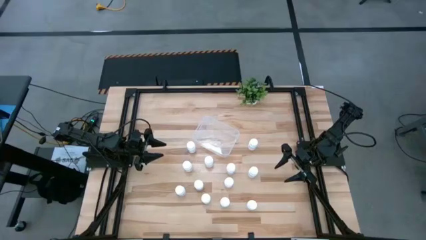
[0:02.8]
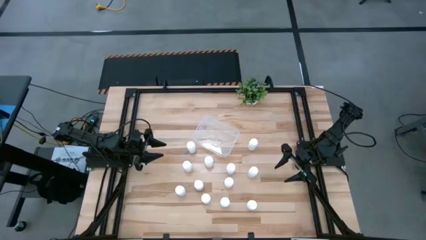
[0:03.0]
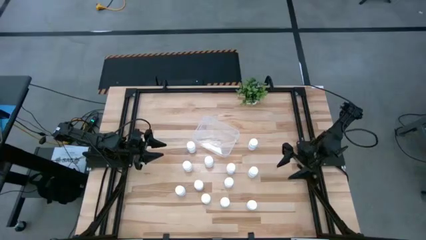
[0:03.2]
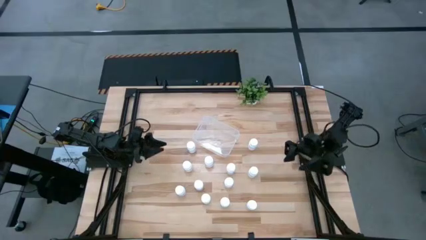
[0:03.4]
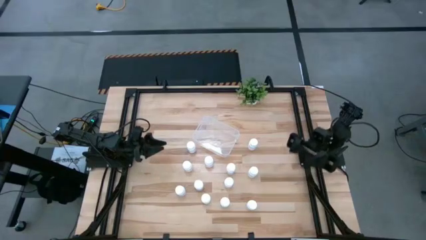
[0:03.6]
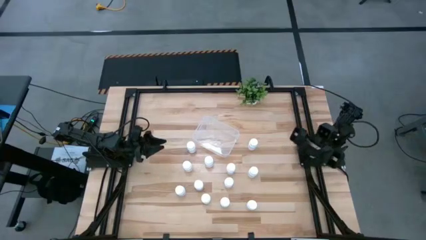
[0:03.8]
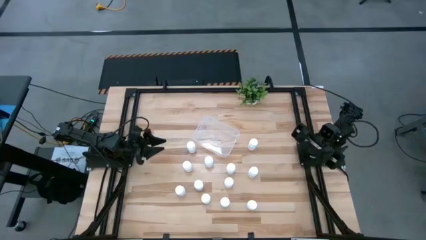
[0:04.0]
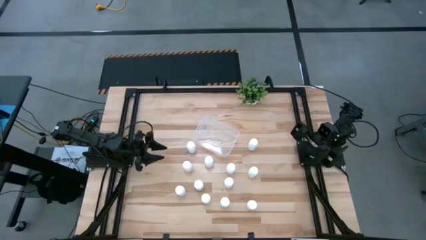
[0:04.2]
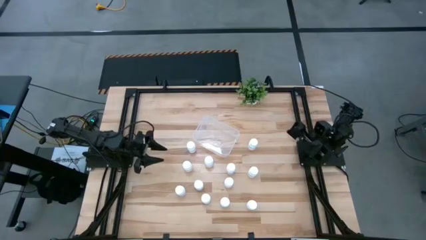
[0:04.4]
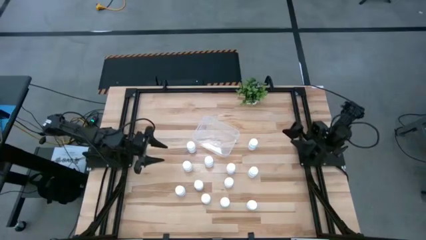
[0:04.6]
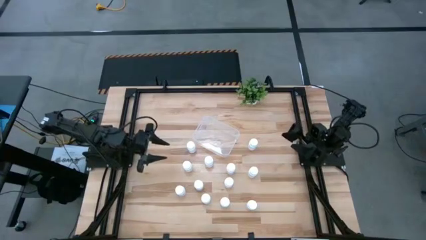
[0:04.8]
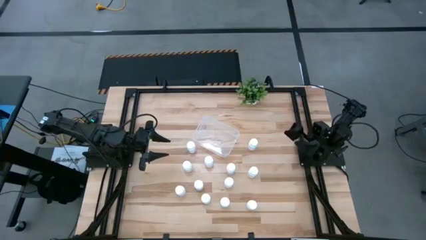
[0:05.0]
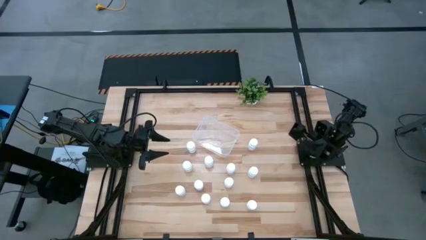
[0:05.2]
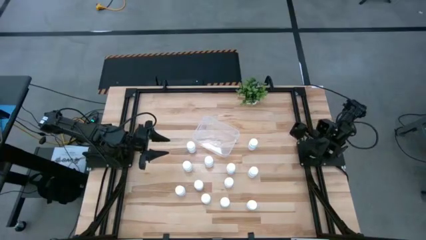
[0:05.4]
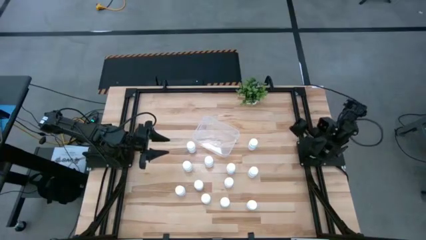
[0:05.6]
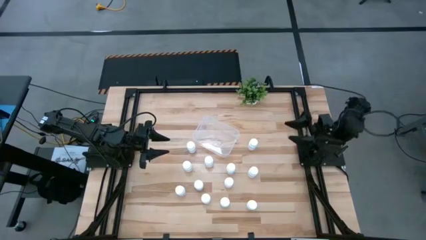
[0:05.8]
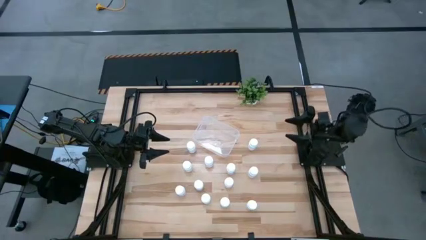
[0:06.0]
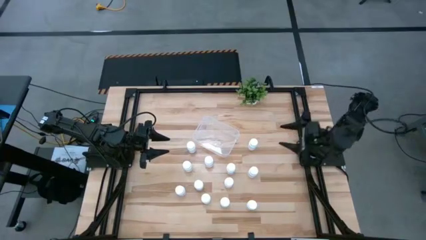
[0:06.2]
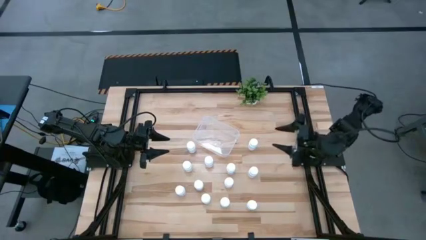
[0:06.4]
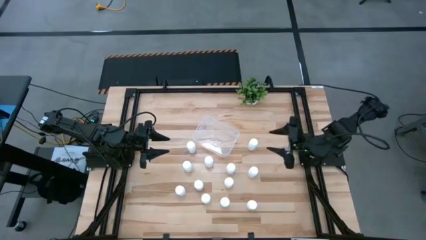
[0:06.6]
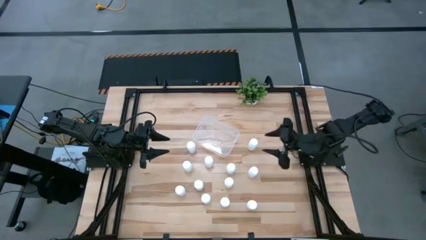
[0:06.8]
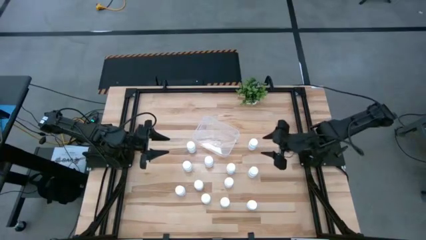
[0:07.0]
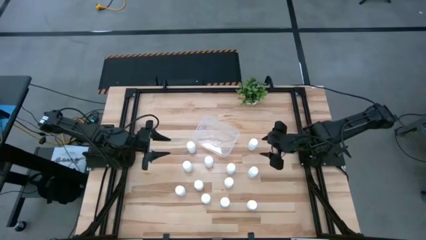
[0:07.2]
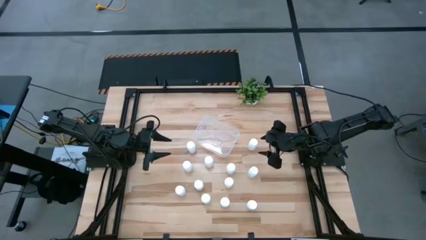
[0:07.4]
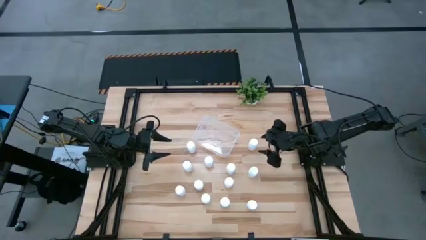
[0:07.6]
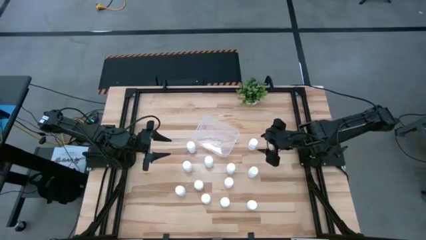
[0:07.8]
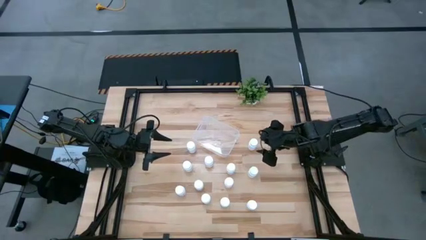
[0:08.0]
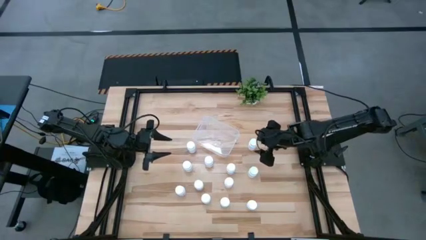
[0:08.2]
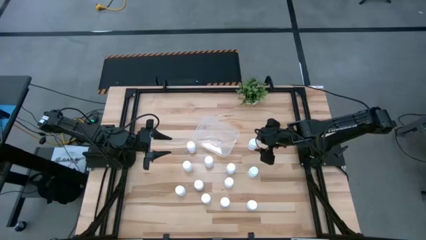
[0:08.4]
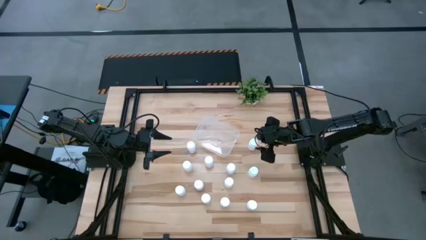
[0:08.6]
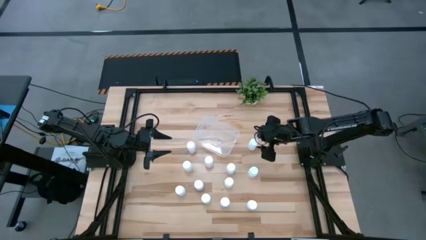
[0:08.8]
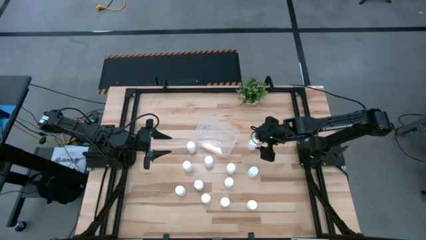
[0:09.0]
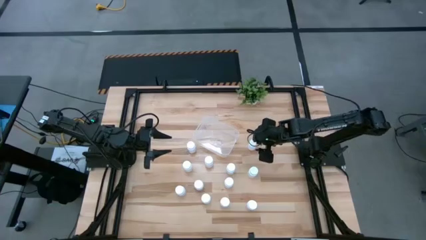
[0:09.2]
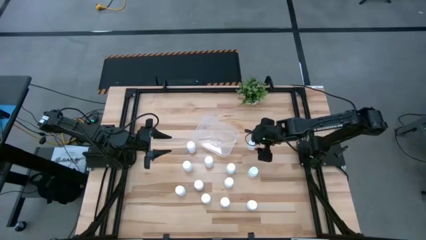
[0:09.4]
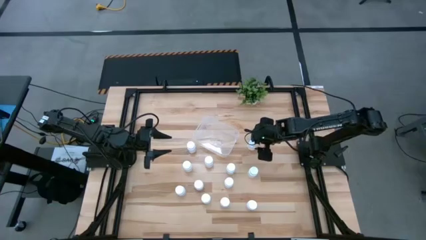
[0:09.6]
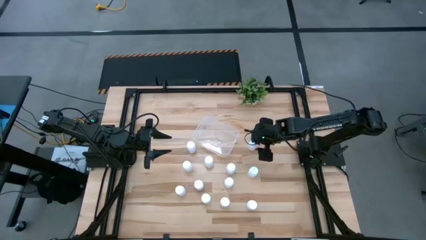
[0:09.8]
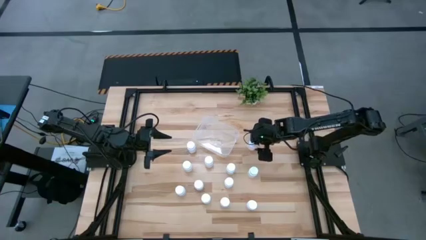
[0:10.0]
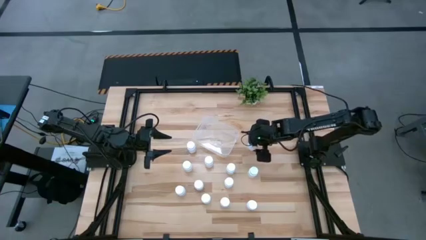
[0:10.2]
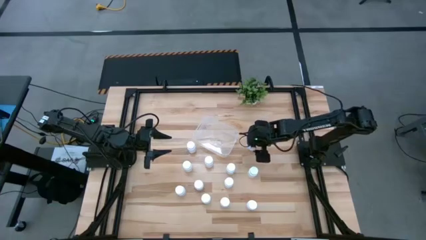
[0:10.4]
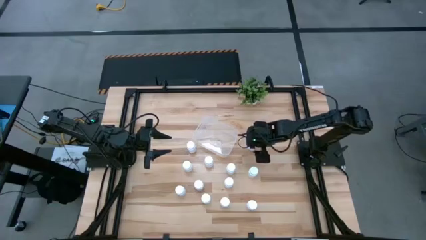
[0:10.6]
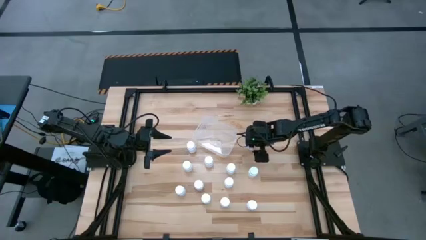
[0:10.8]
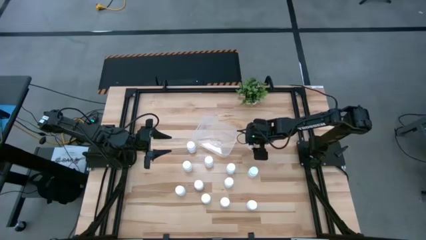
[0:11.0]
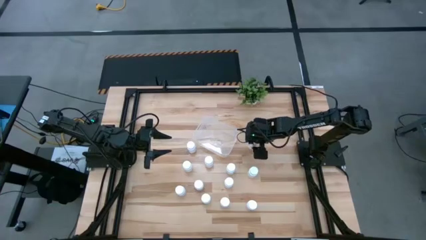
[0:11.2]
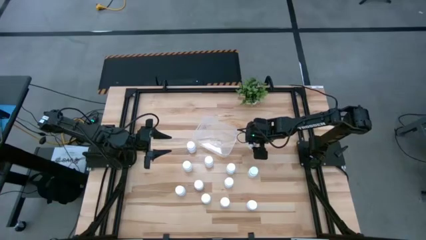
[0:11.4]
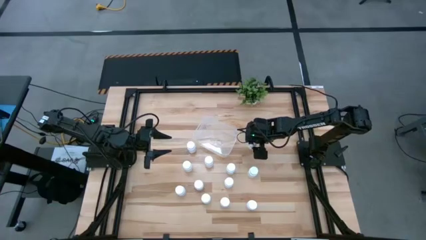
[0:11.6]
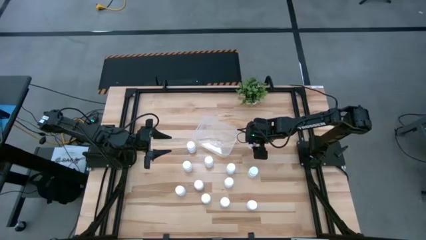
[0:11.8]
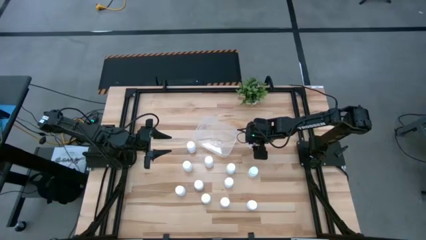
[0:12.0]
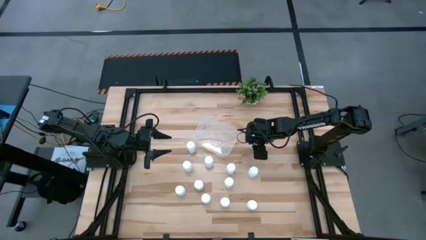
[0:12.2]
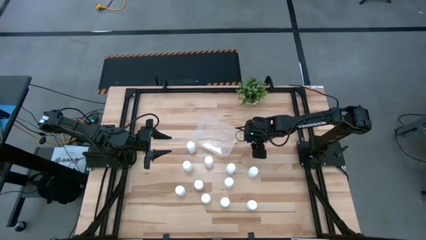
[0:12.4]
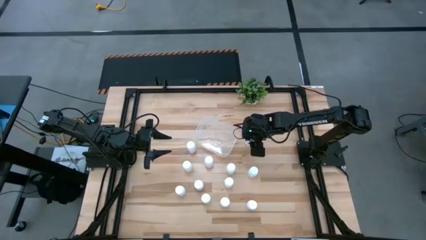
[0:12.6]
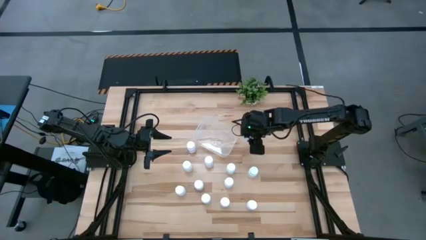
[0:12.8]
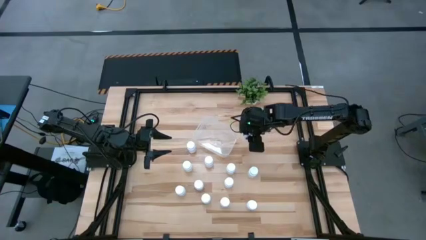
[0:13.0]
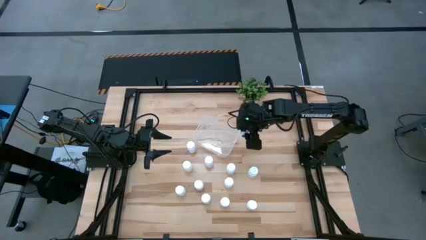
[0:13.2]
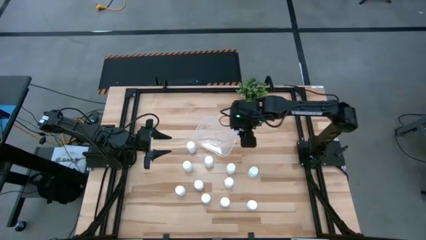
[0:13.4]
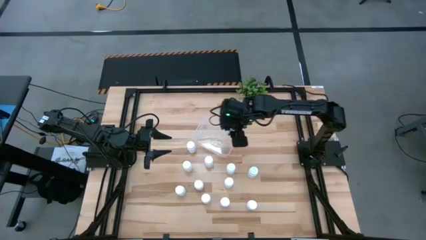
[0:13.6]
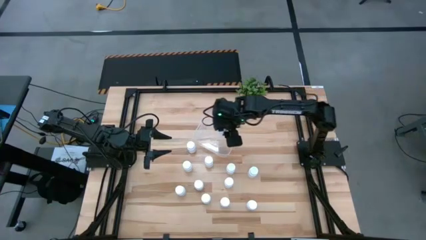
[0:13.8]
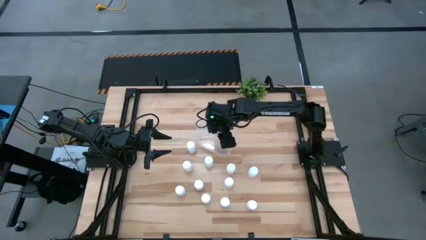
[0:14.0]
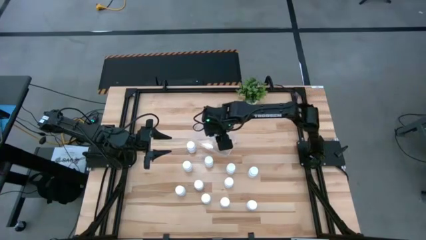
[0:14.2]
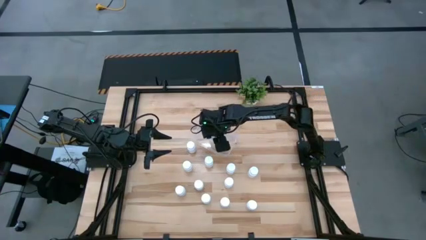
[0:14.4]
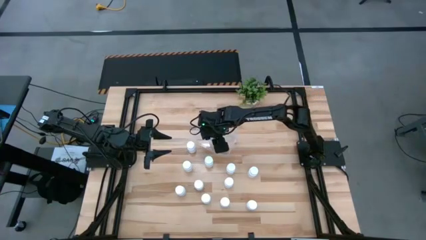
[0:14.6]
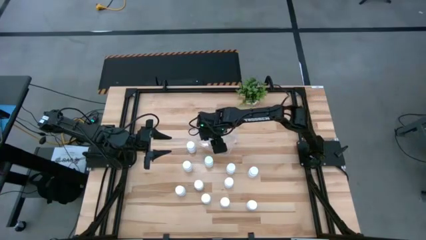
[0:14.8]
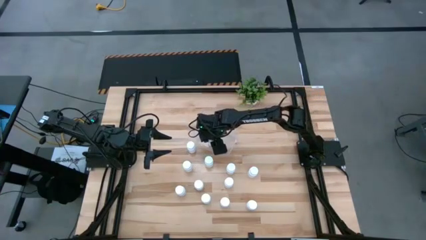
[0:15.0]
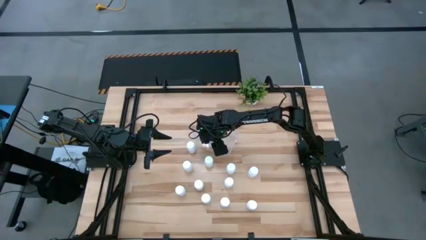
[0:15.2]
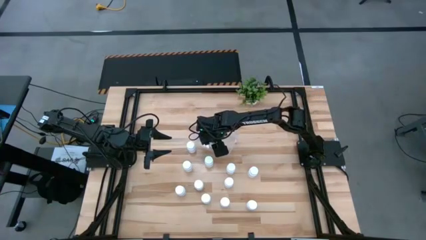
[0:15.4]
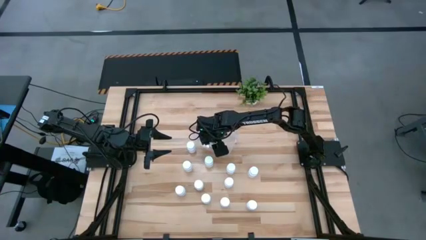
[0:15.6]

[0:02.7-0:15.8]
Task: Pick and place pill bottles into a basket
Put the pill bottle into the bin

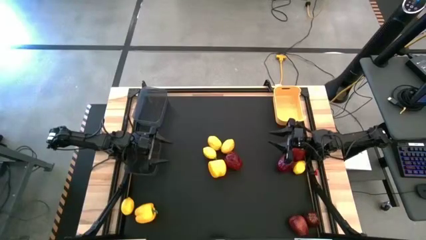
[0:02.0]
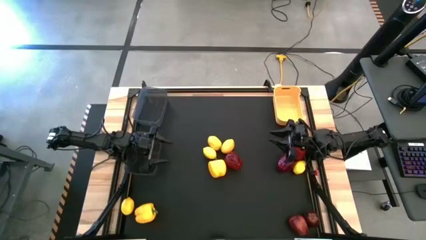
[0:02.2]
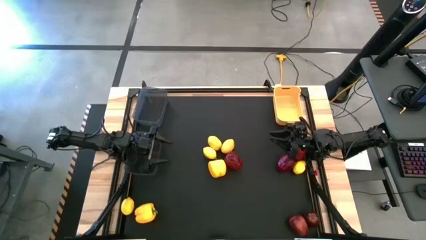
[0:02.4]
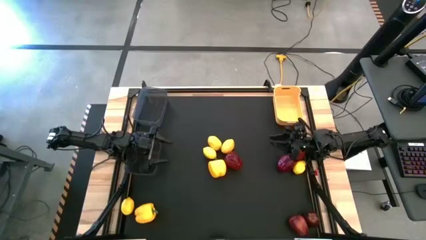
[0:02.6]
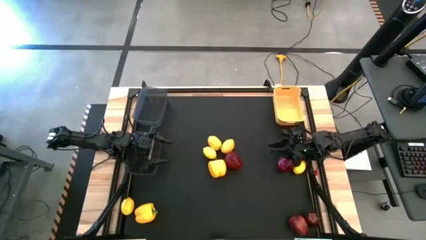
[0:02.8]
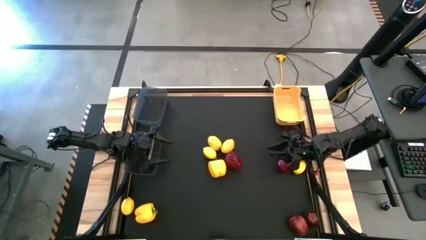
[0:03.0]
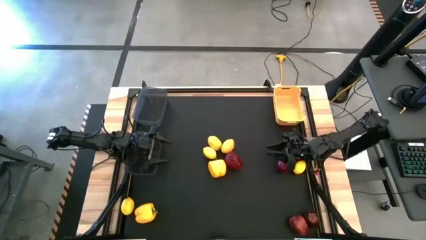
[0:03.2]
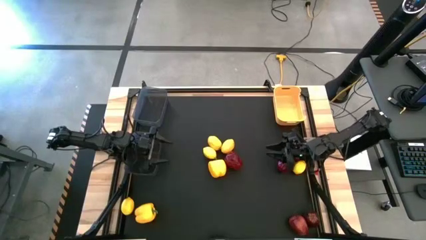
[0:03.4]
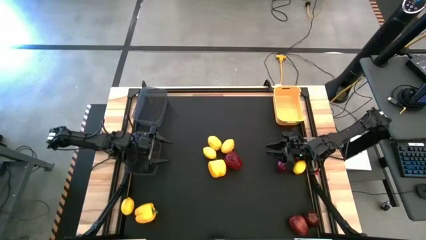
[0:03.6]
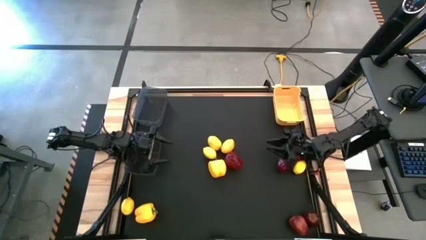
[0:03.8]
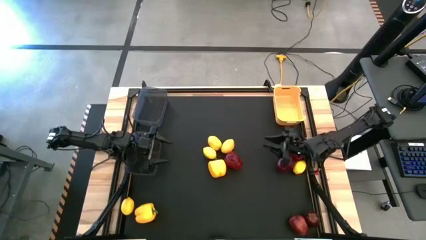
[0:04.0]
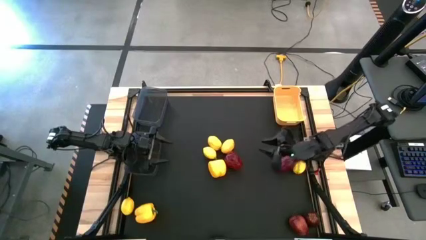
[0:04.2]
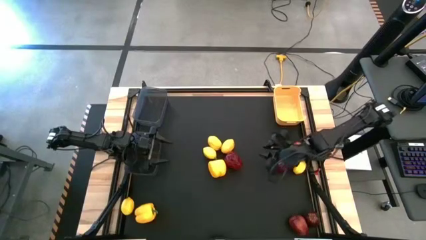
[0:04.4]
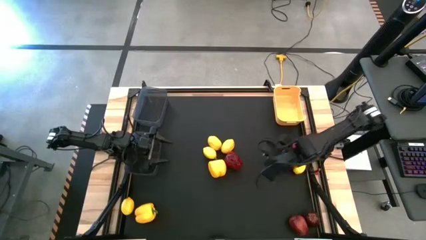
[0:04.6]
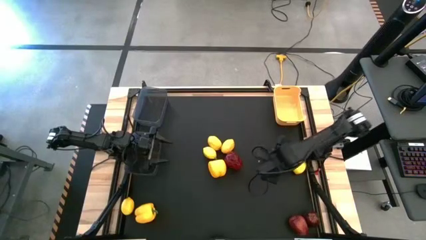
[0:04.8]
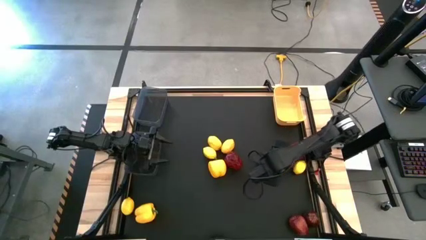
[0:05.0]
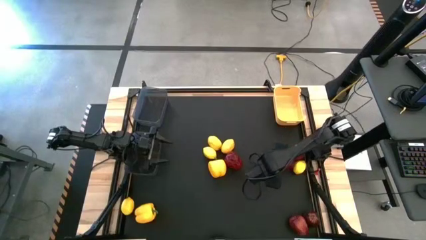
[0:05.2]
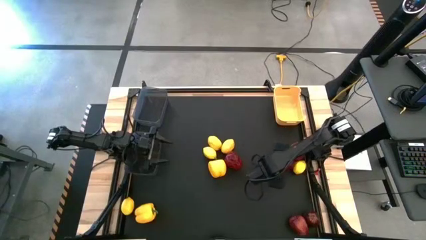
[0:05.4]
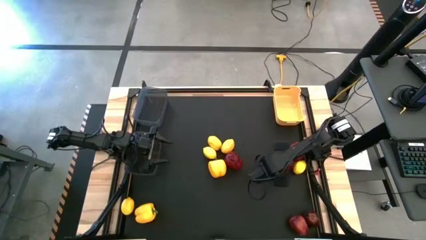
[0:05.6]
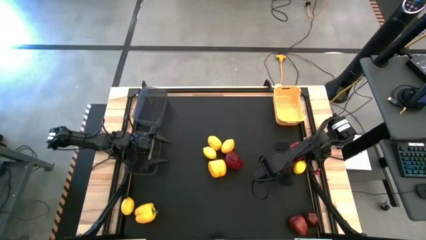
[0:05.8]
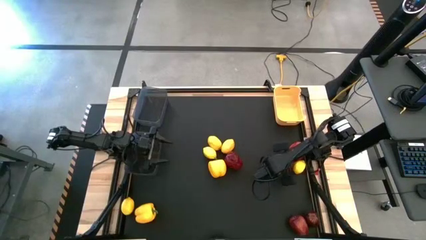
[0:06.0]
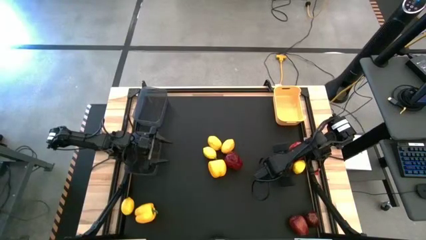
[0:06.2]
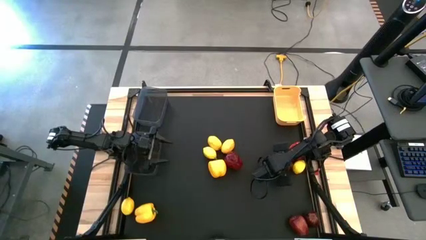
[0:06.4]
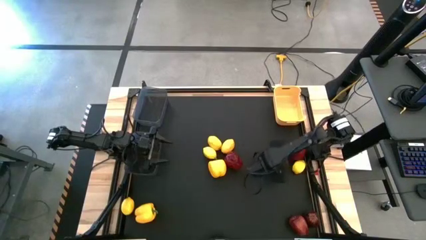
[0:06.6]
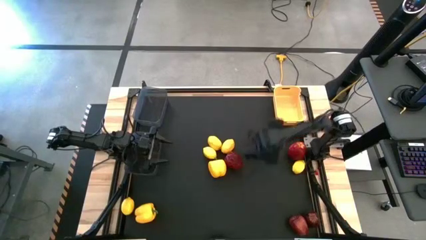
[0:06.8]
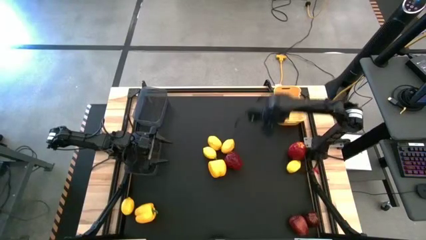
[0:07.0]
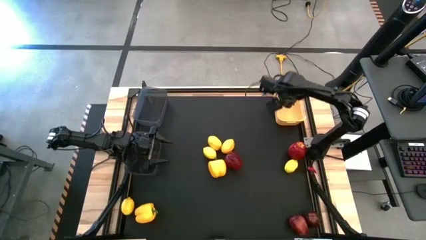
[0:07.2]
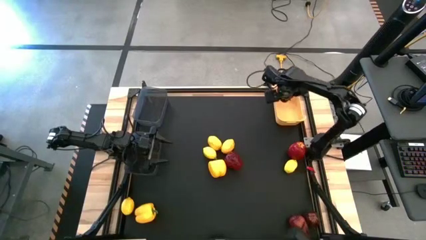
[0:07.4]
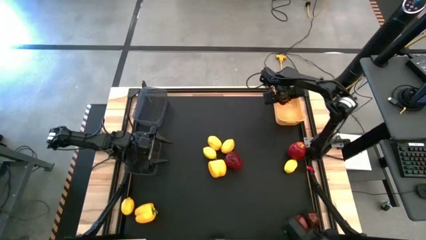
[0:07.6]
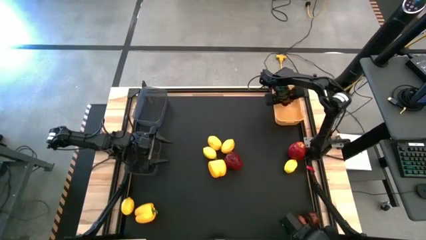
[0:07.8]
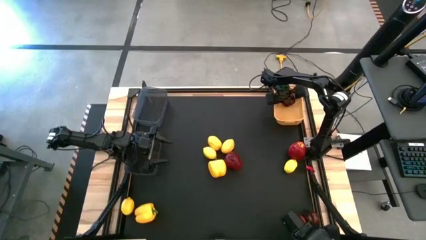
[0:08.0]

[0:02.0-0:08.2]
Task: Sort produce into baskets
Put the apple into the yellow bin
